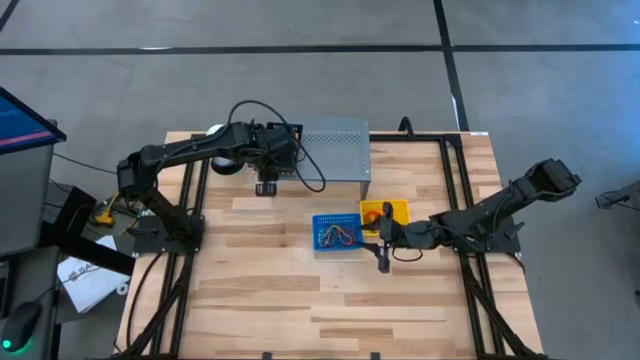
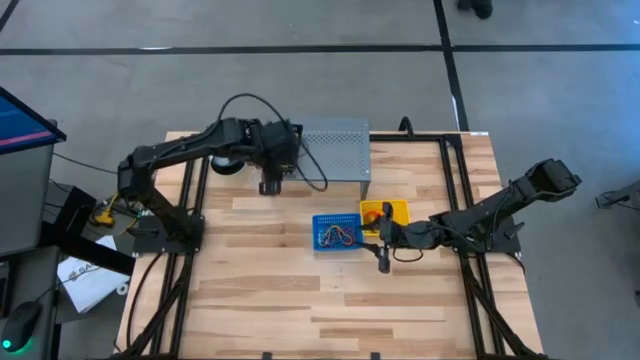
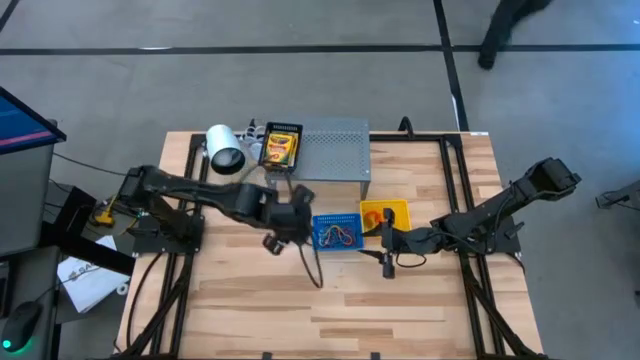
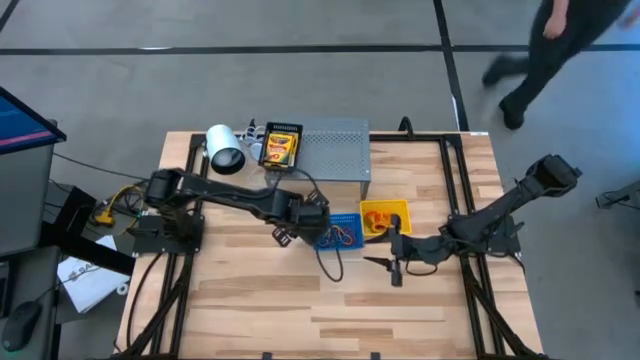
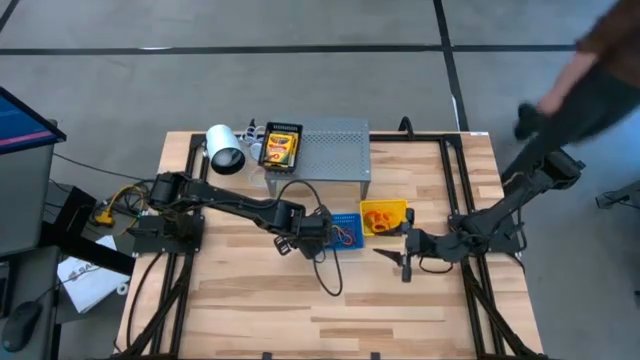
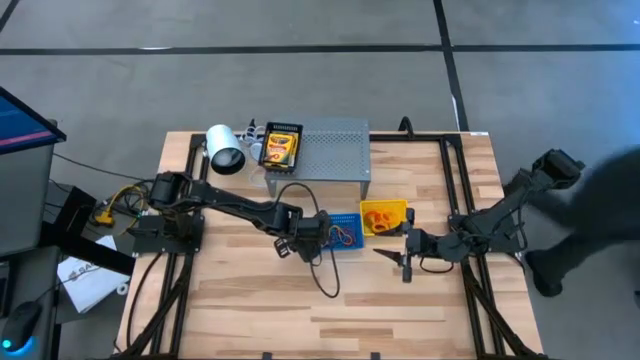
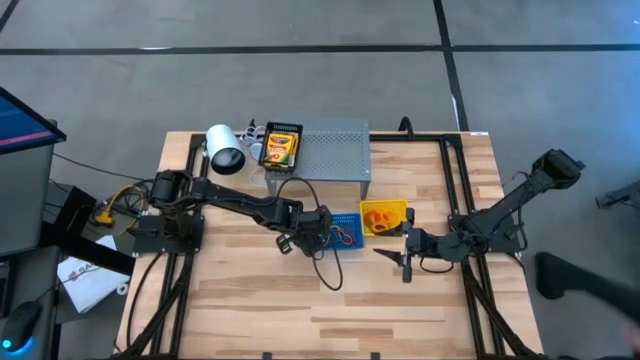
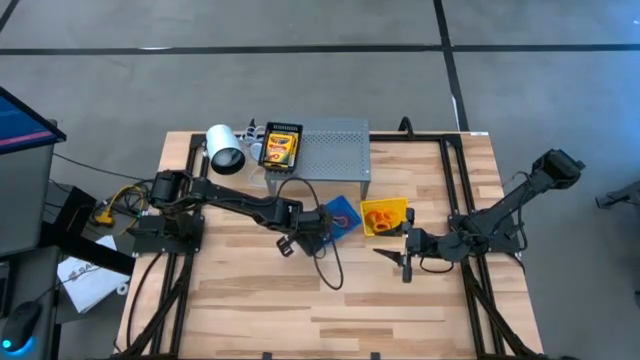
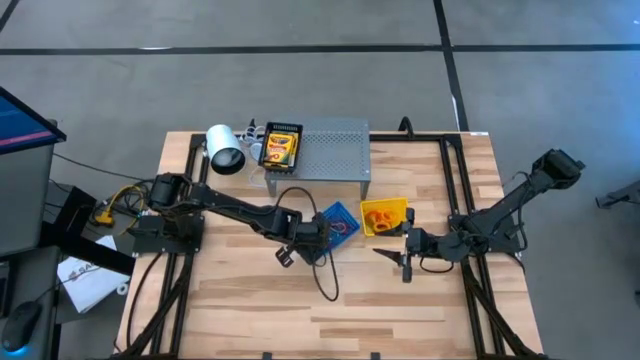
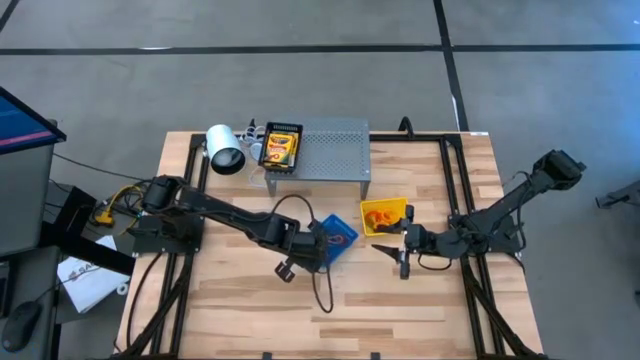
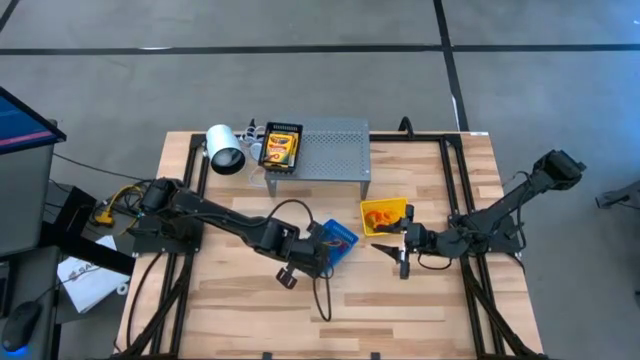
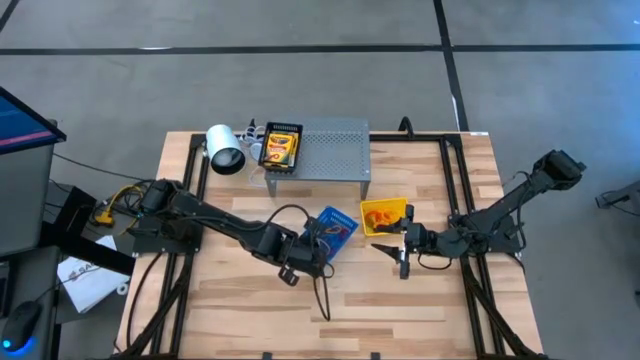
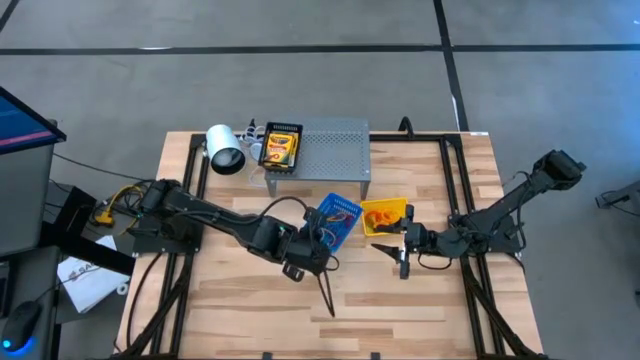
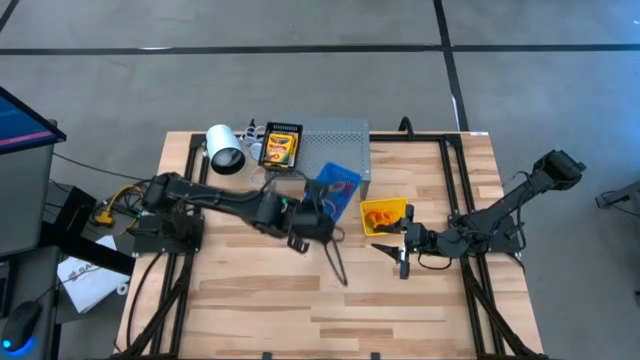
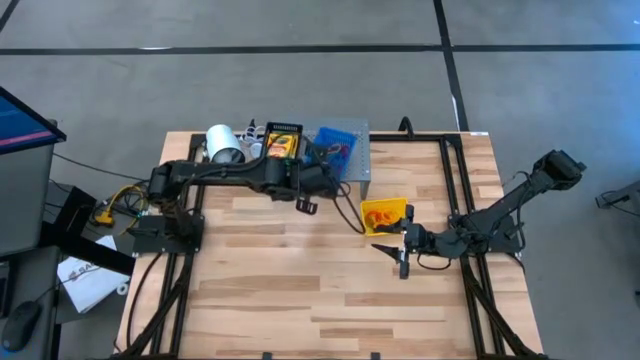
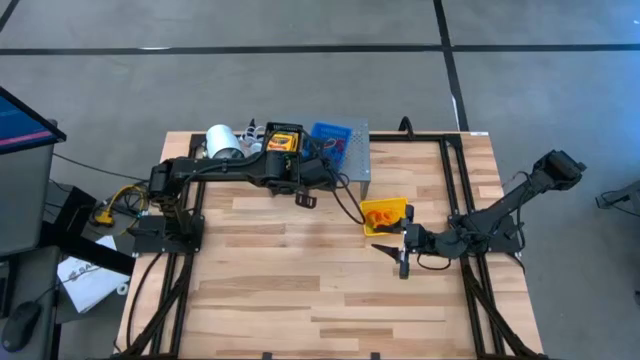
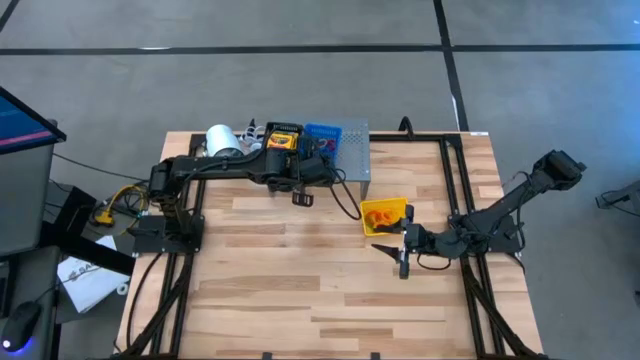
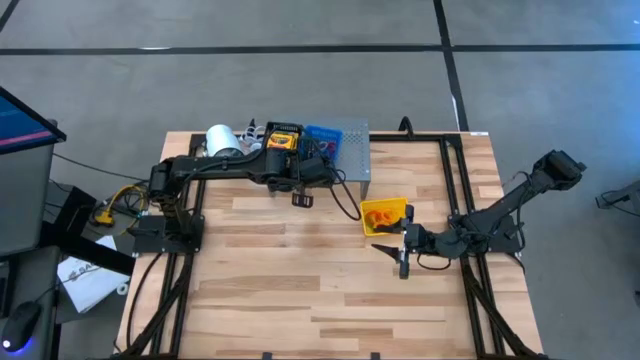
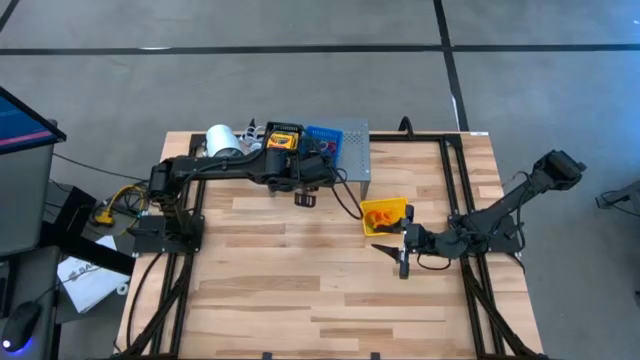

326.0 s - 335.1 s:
Task: Pick & Place Office Desk Supplies
Put the blue bin on the shelf

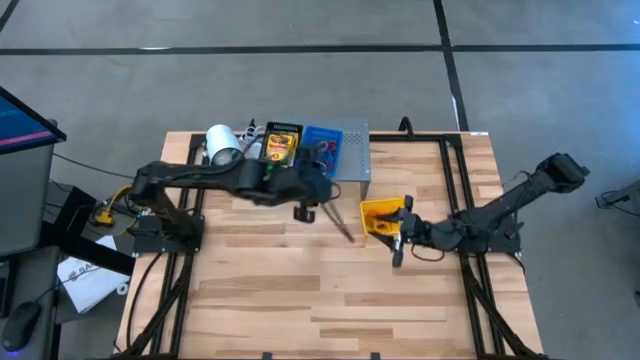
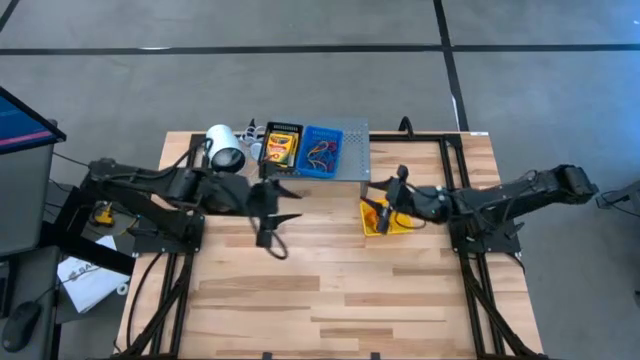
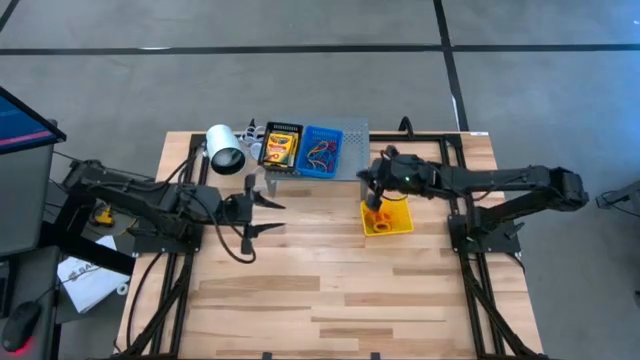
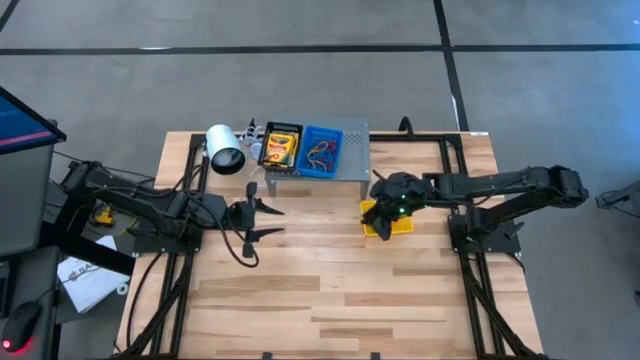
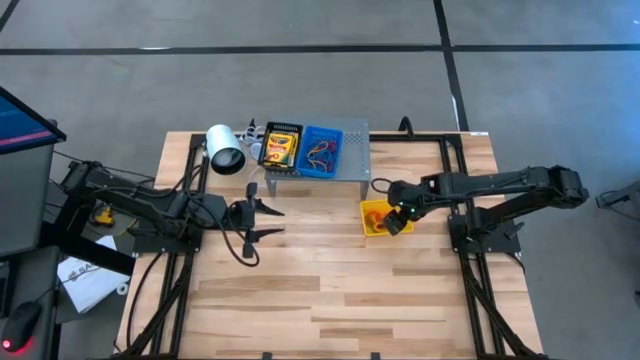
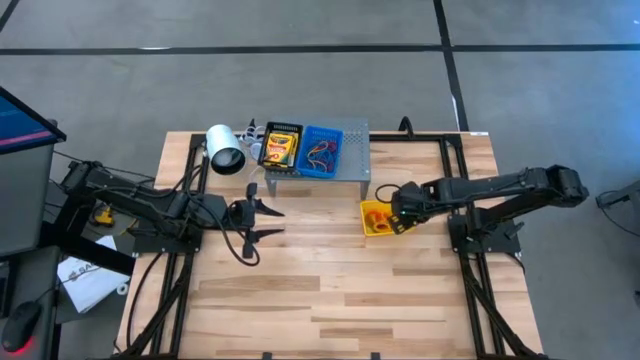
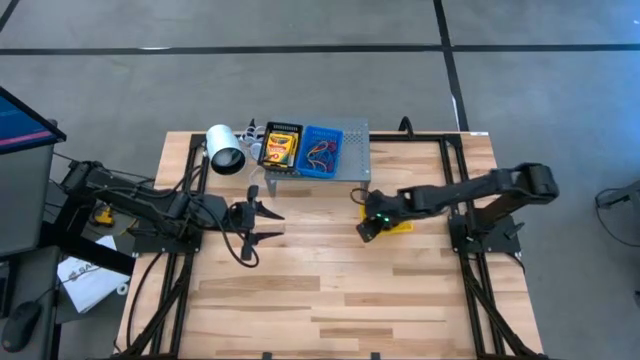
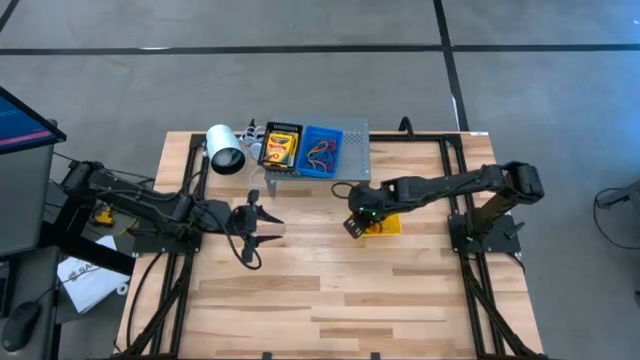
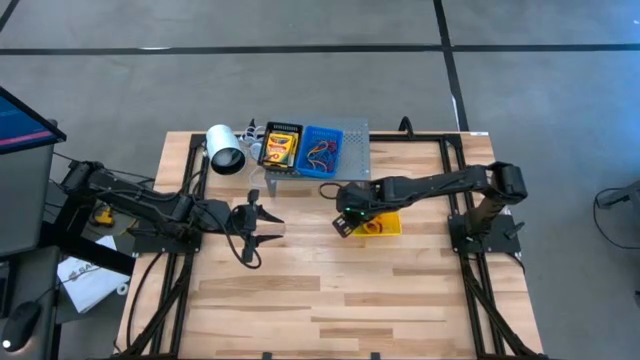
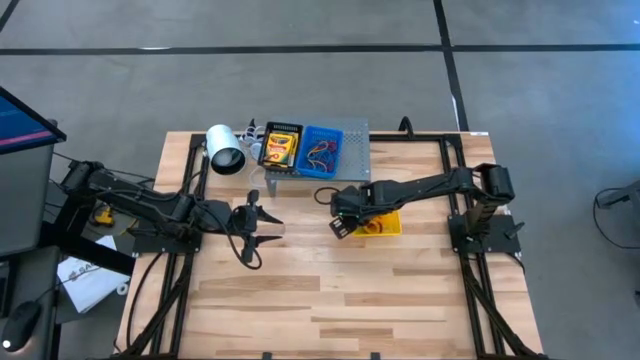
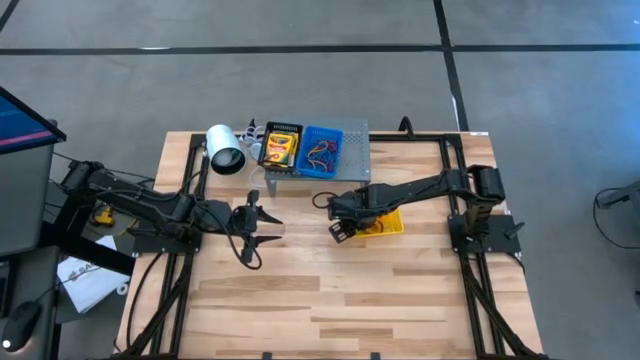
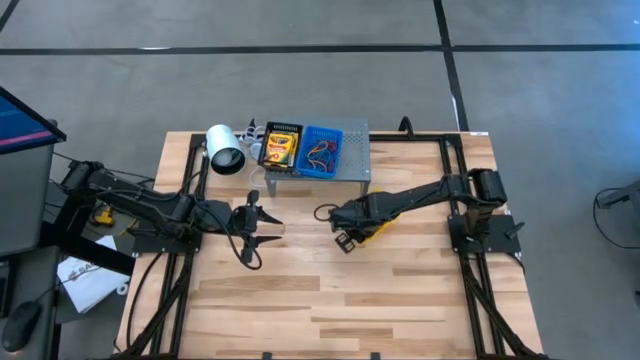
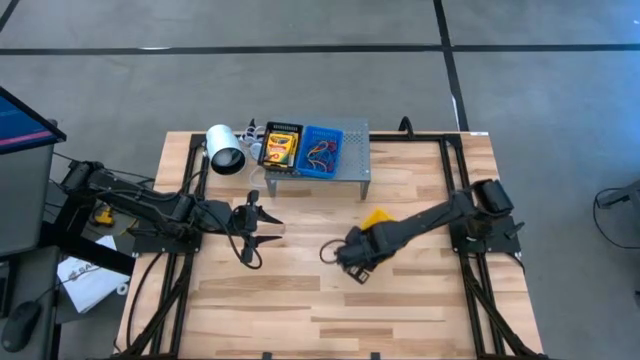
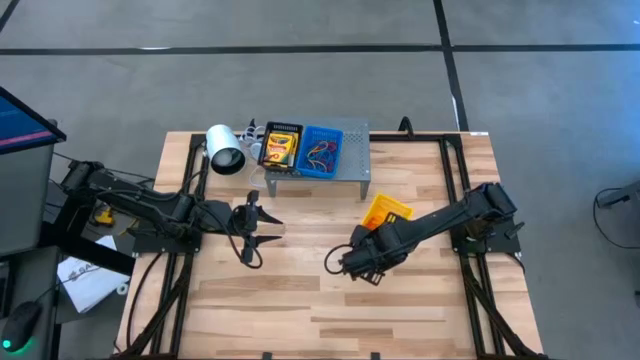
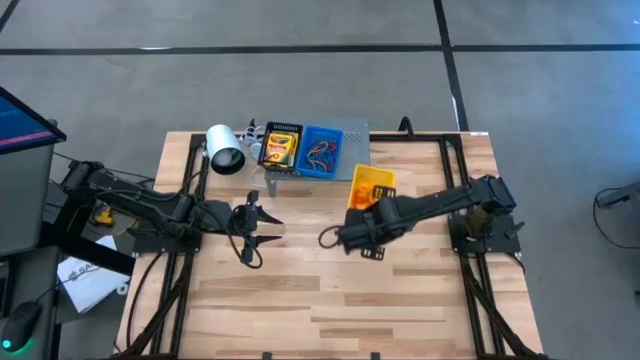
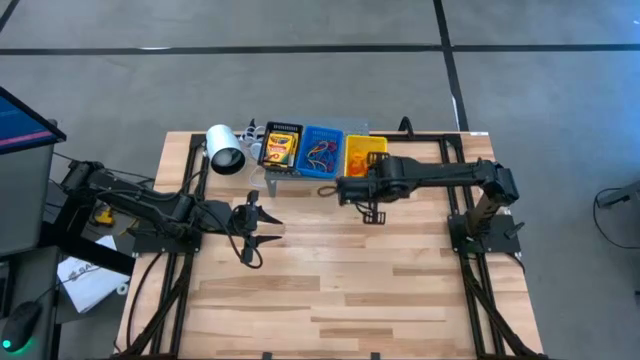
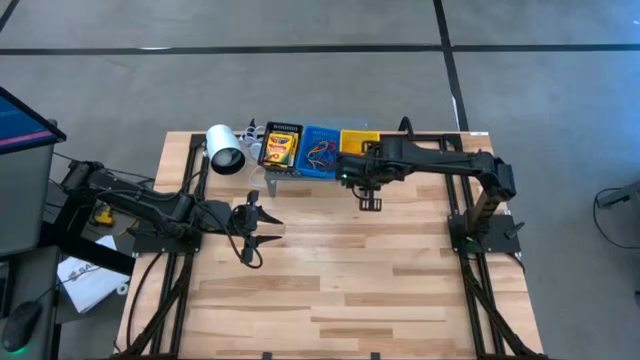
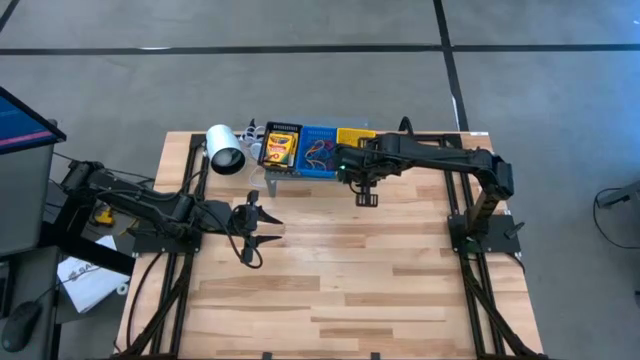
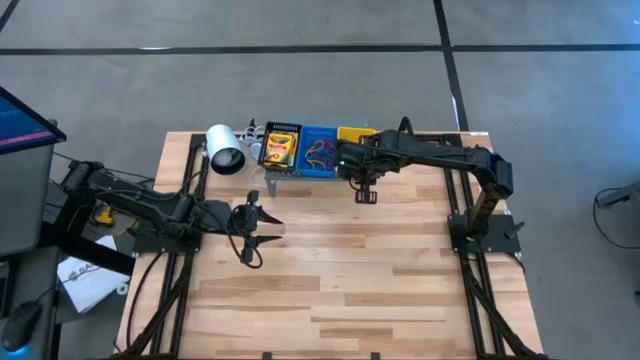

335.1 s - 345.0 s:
Put the yellow bin on the shelf

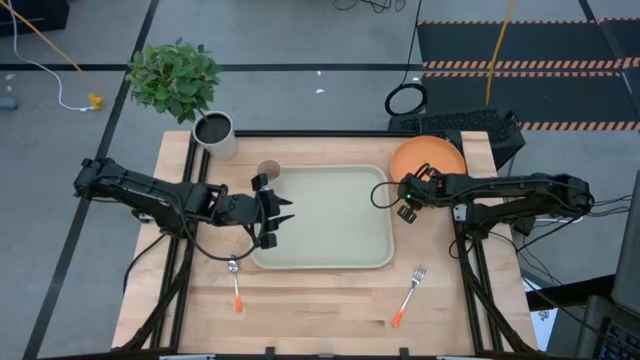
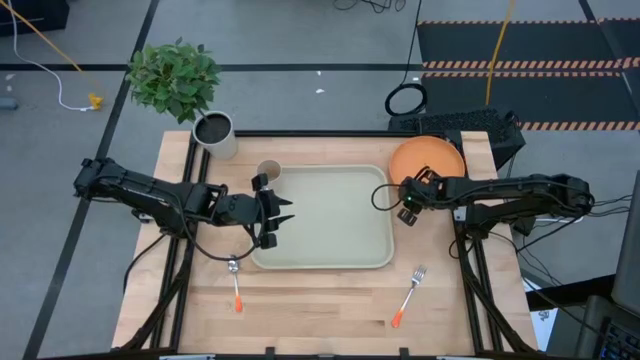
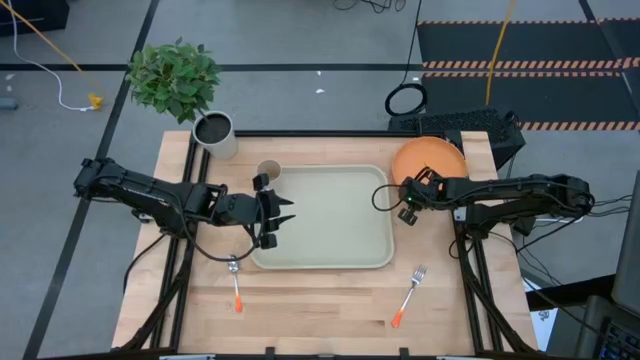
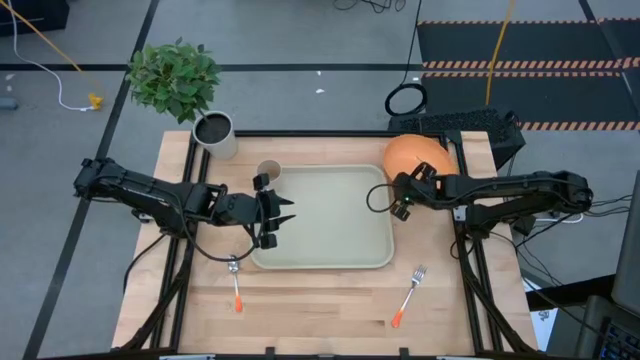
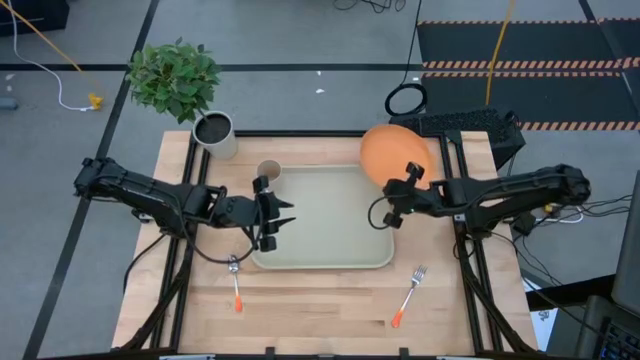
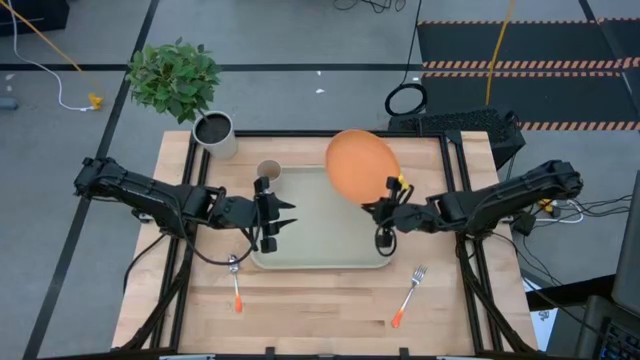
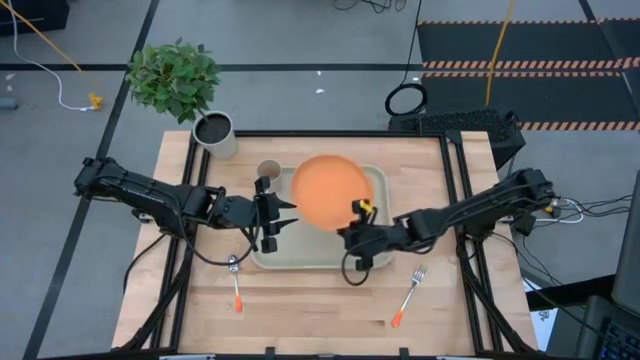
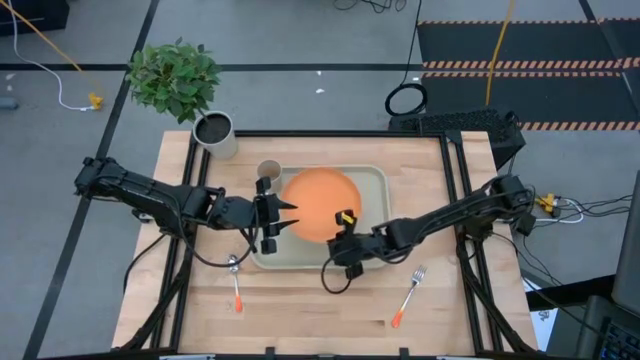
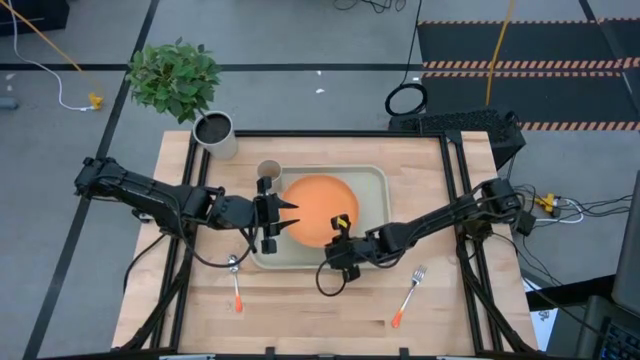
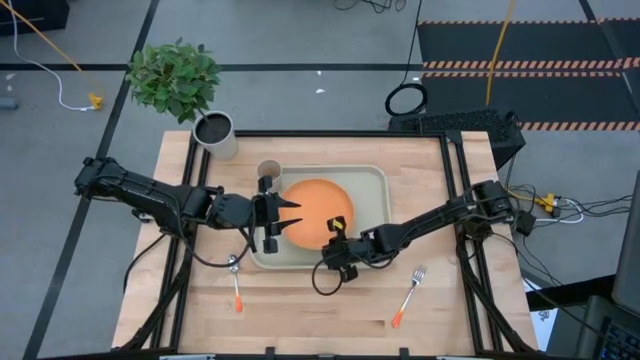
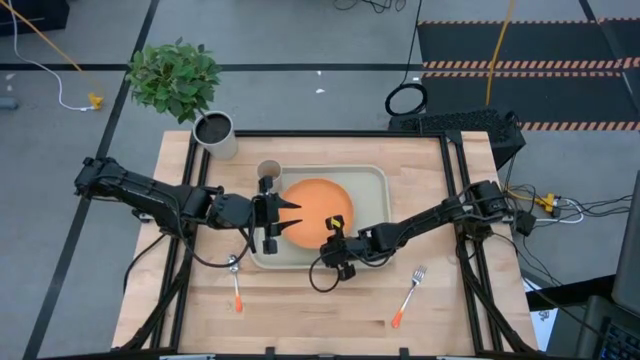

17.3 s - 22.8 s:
Task: Pick and place plate/cup/fork/spoon on tray
Put the orange plate on the white serving tray
